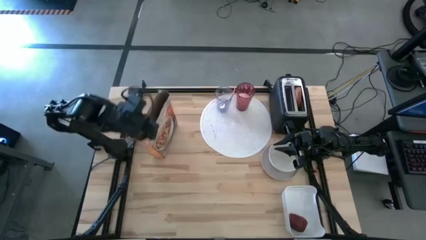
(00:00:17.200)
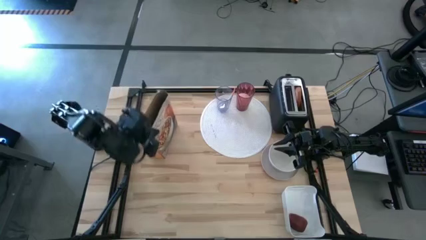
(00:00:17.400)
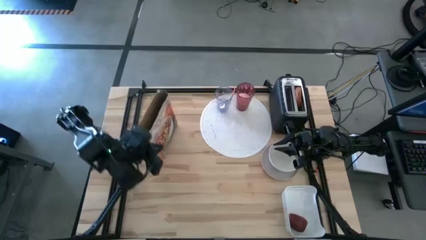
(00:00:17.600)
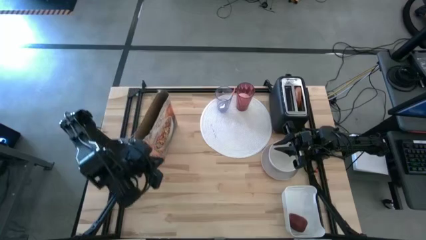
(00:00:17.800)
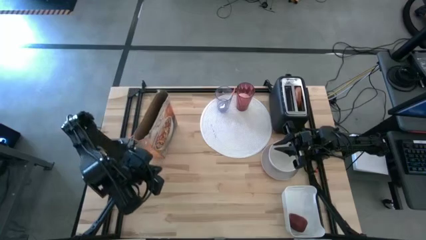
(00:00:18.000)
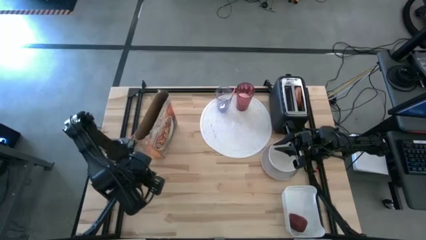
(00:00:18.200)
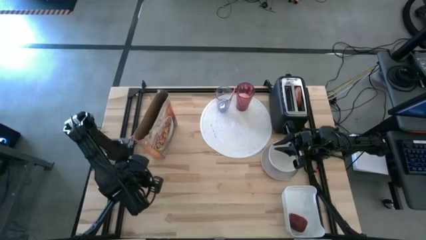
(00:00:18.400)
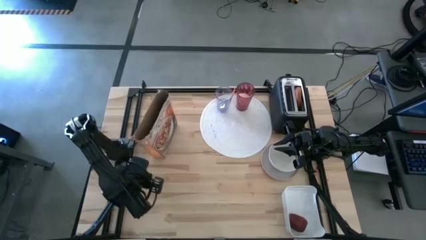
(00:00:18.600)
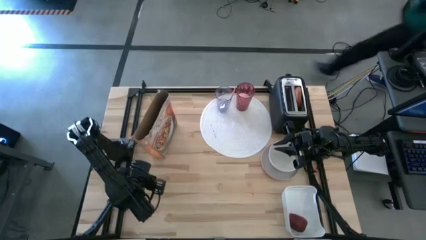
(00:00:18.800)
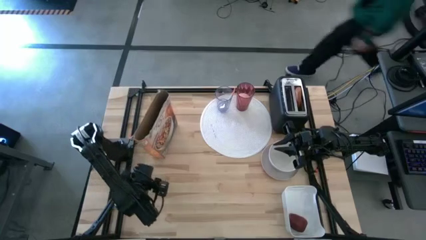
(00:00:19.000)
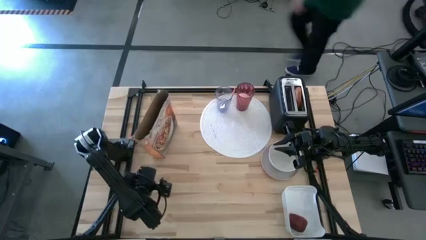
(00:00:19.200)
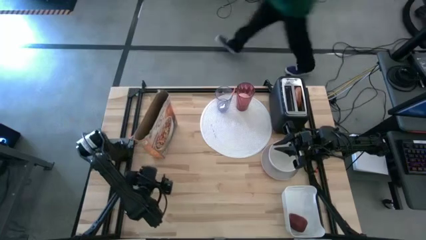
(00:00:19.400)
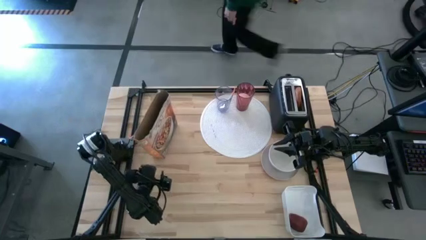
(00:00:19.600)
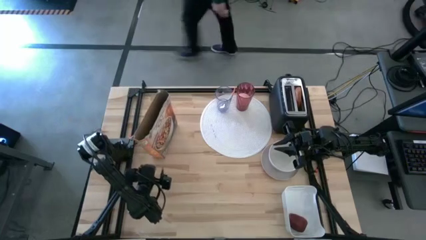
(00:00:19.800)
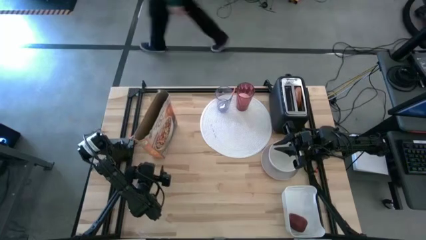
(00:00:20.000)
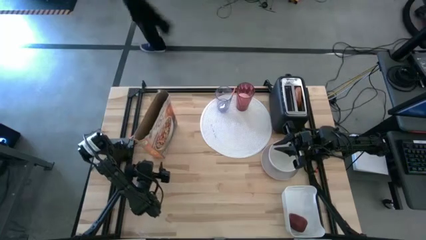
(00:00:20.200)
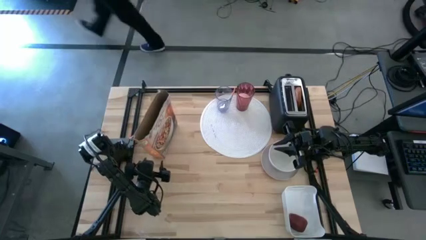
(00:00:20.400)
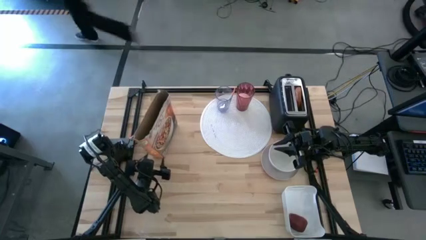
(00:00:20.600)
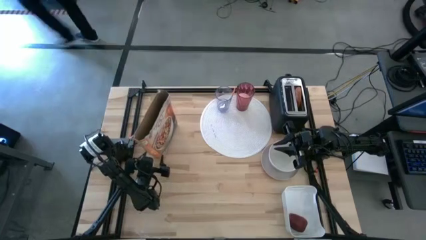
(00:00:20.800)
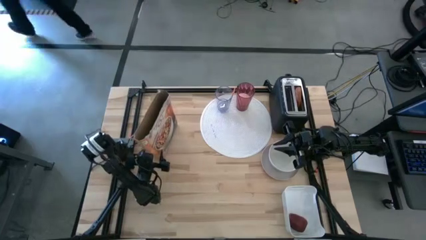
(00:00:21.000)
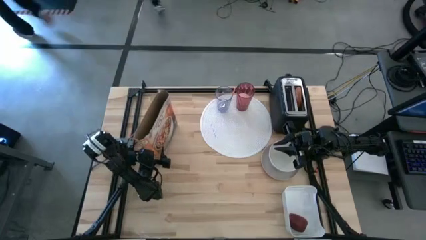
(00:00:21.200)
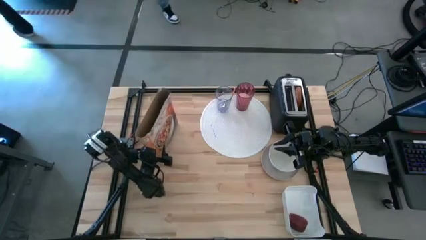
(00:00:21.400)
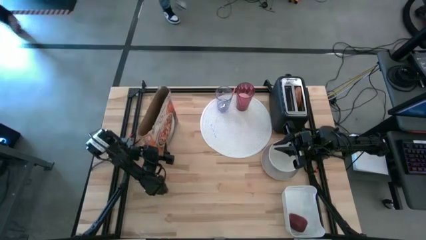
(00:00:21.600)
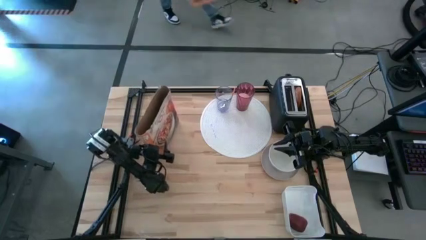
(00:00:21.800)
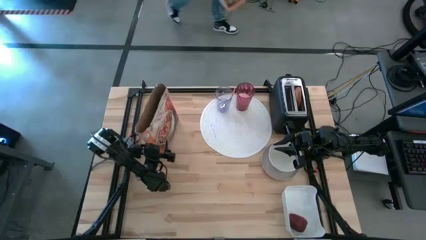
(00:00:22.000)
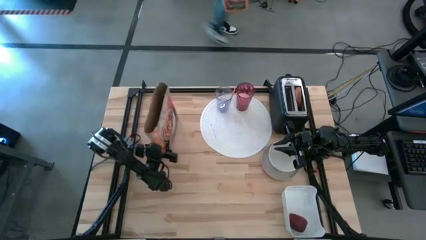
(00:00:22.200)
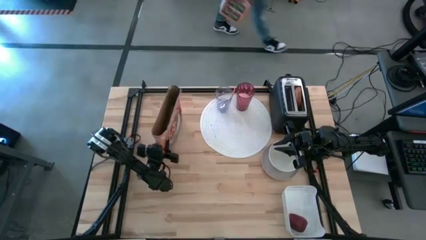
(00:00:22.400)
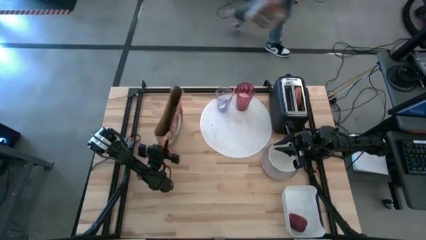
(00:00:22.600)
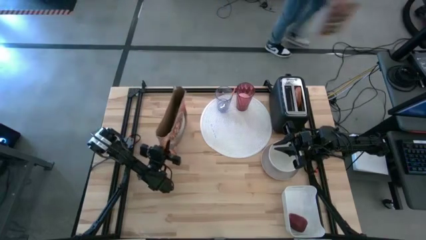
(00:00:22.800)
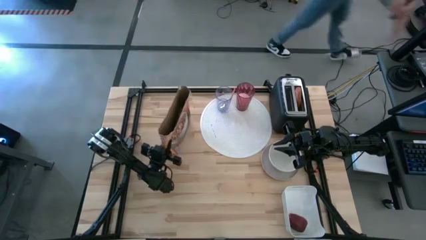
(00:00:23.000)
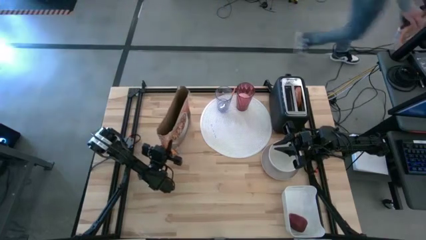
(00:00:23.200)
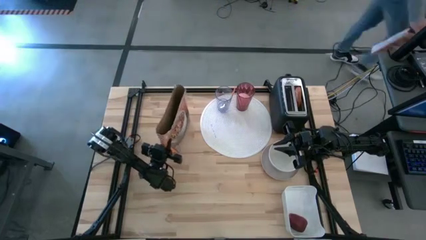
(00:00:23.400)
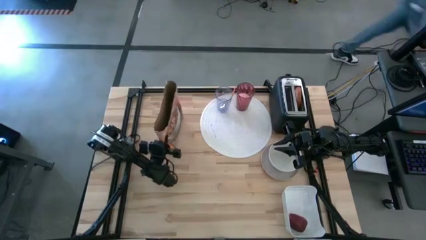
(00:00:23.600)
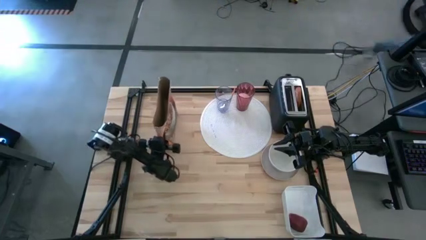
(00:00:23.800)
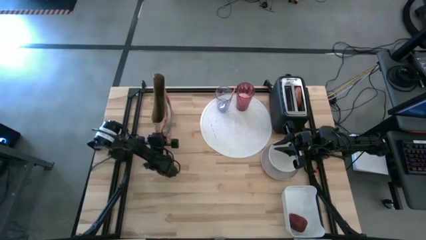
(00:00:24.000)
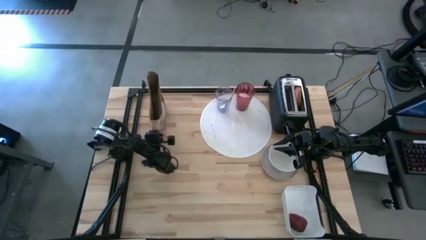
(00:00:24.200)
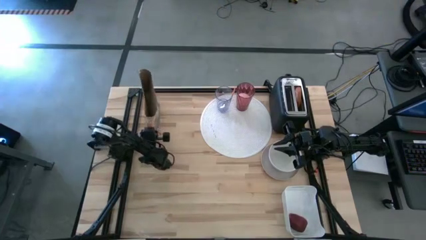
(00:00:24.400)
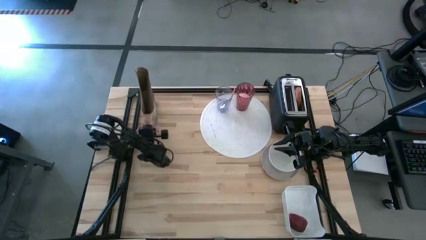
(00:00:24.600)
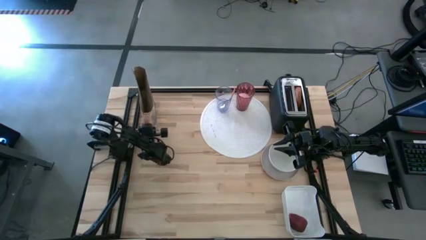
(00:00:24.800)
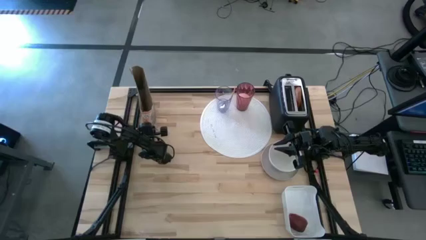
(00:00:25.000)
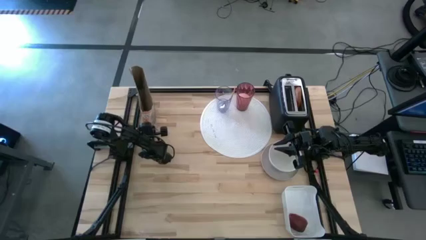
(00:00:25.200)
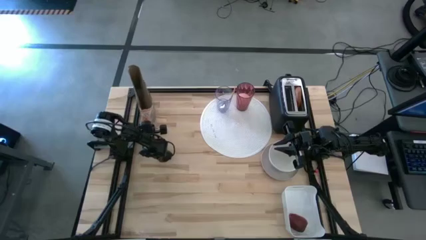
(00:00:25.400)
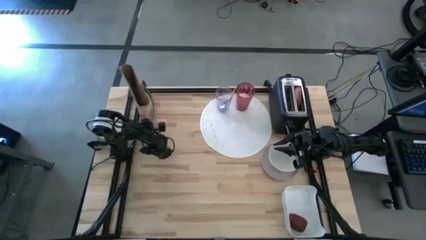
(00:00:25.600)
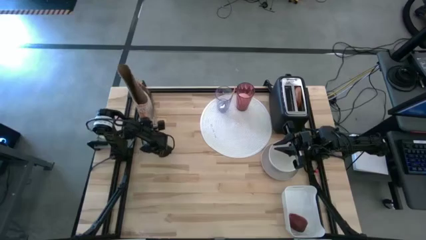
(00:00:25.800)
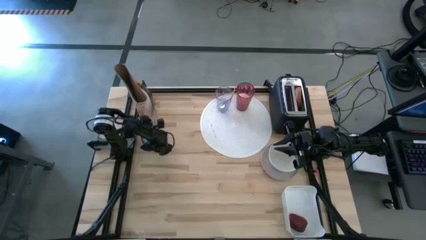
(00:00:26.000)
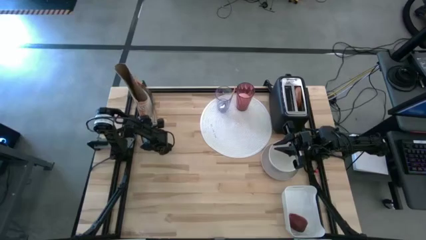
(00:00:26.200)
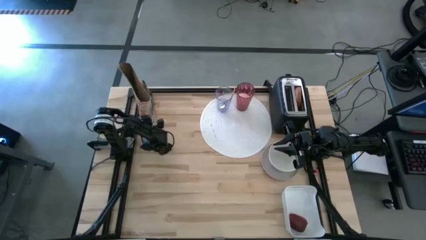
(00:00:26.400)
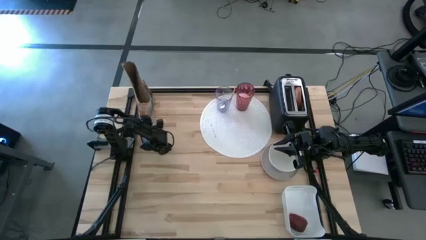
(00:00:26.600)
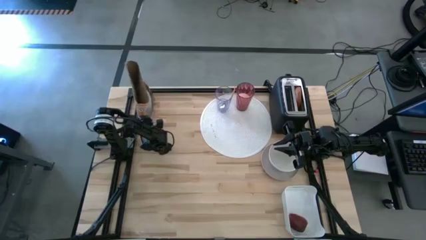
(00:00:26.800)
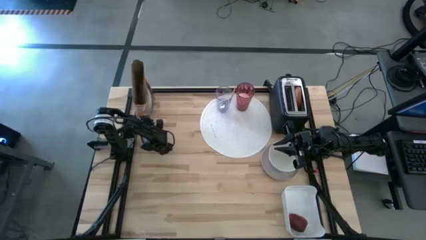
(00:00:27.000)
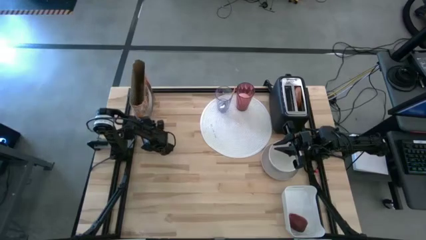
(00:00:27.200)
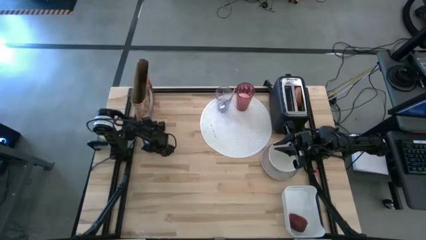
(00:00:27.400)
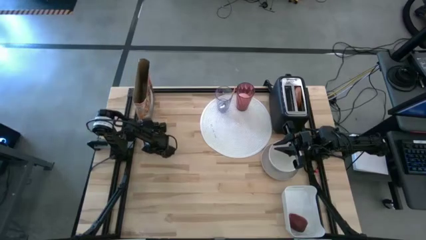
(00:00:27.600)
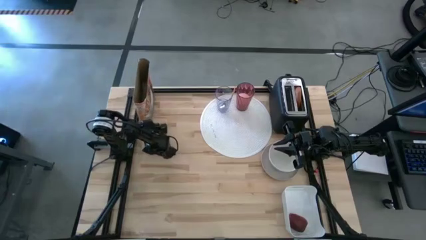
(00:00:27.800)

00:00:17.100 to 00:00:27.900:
Task: Arrange a breakfast setting
Move the orange cereal box to the top left of the table

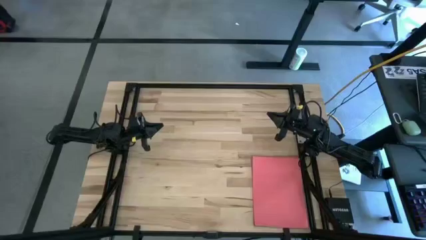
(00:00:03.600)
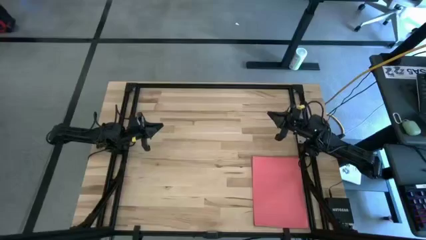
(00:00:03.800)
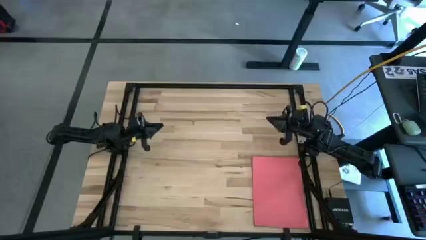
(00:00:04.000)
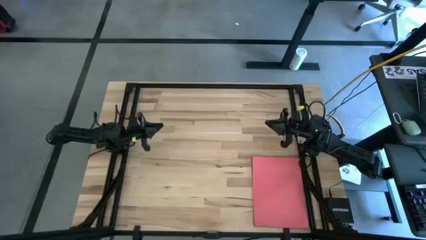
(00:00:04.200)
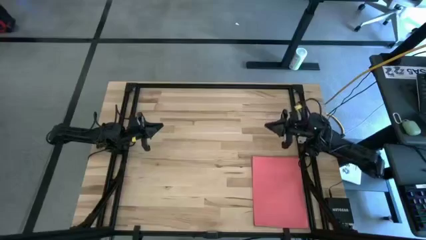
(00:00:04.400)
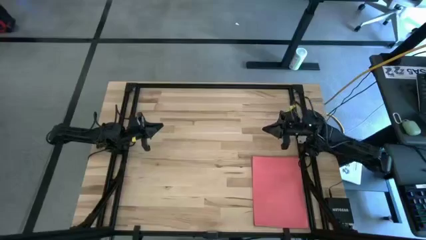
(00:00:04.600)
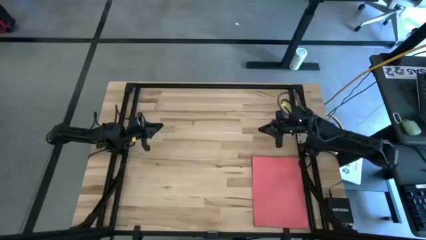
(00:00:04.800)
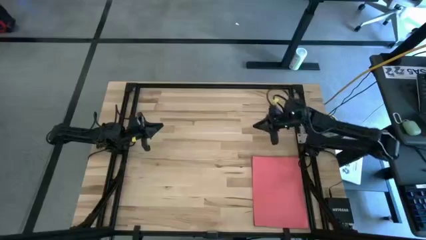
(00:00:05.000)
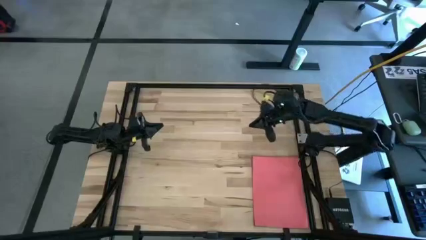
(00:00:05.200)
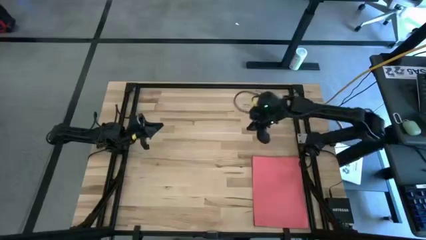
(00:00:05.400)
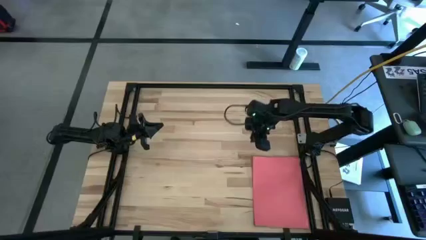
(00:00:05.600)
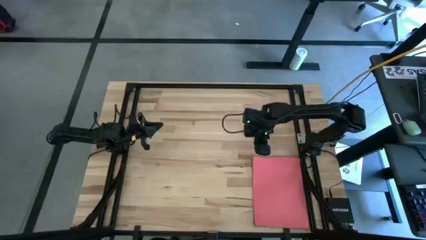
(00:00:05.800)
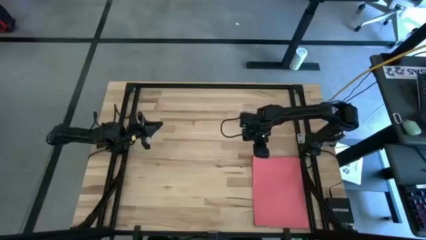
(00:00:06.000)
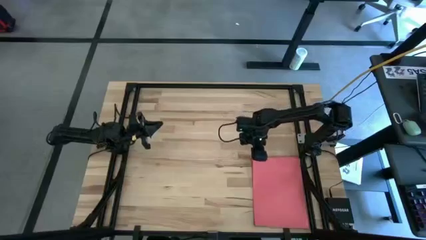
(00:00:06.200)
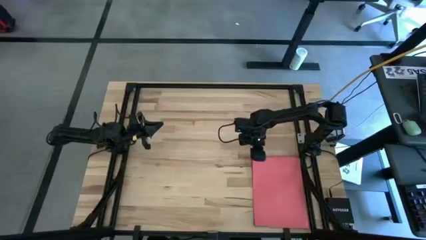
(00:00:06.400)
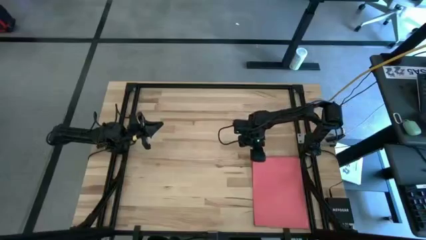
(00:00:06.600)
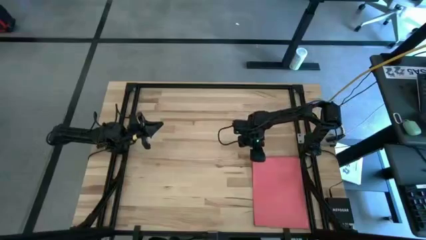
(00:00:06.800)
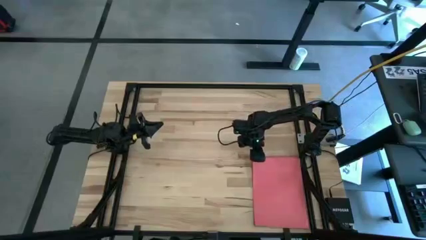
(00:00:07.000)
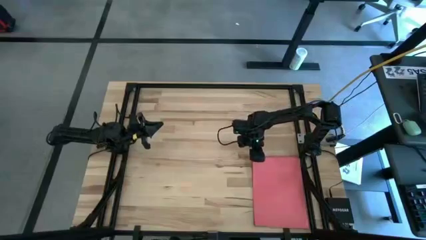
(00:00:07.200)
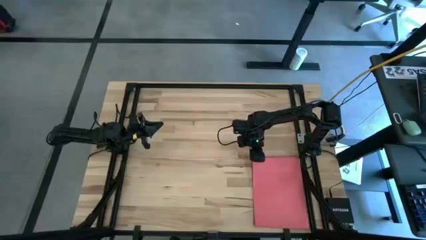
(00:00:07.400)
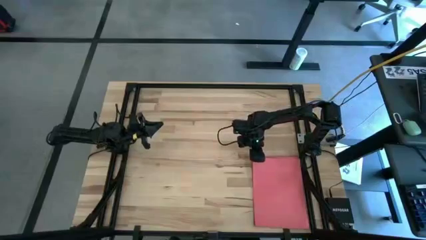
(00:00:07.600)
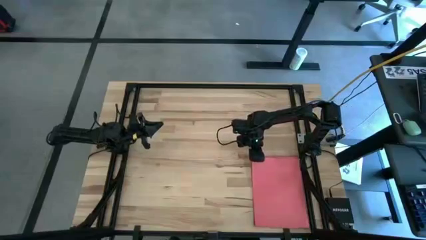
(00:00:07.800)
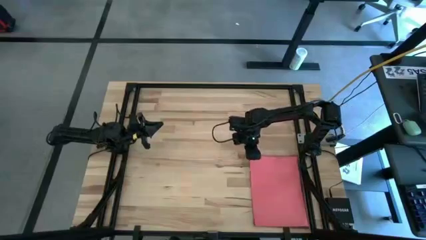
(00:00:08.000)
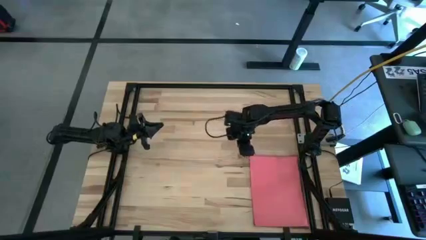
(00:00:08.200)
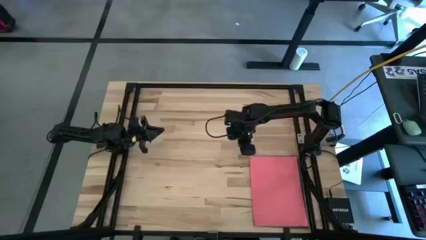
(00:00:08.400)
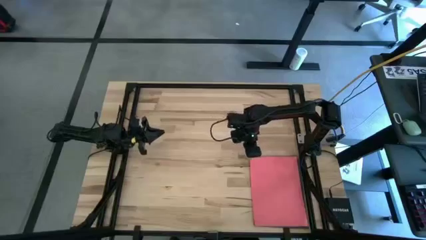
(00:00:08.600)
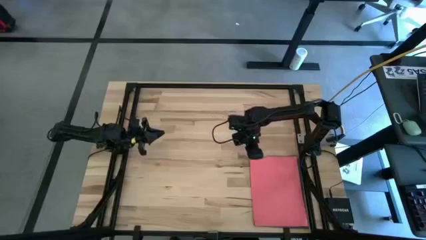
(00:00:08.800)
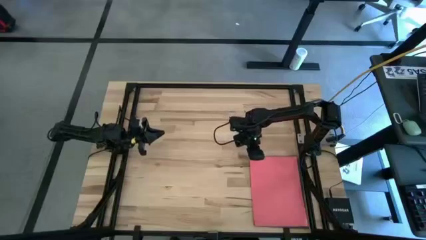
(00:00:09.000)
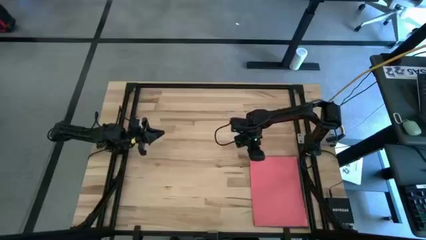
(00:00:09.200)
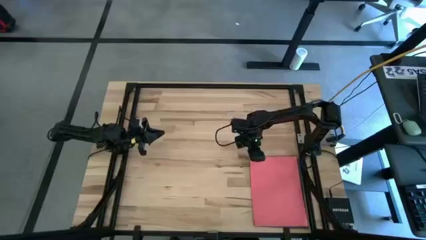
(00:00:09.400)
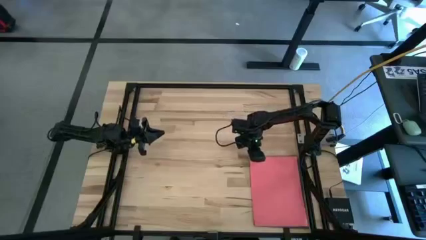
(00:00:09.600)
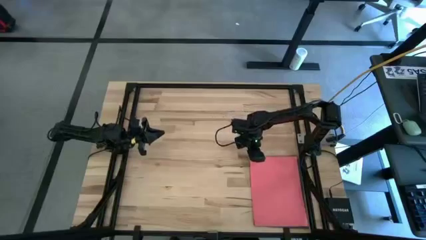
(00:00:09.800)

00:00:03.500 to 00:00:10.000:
Task: Organize paper
Move the red paper to the top left of the table
